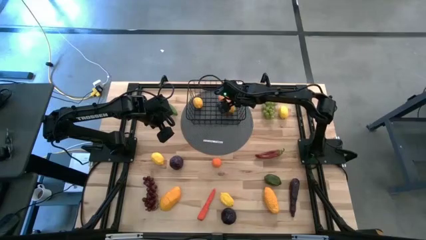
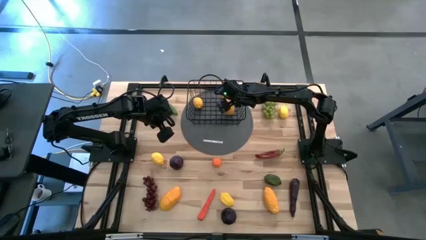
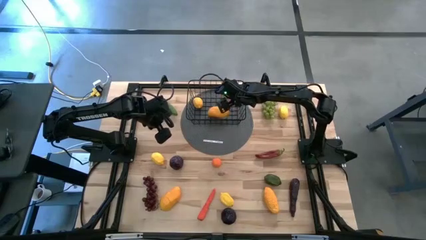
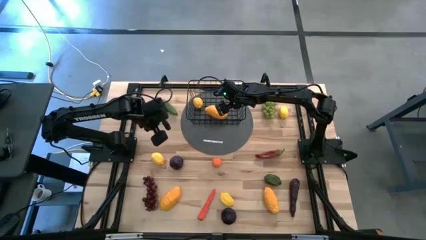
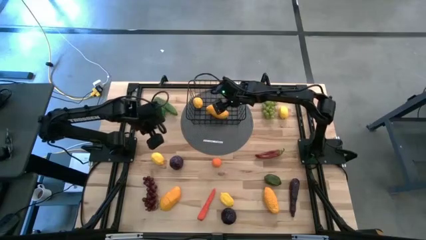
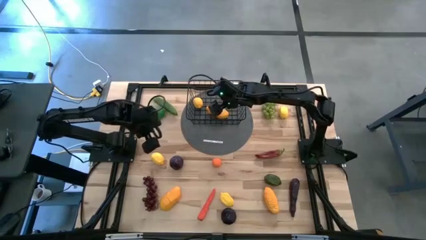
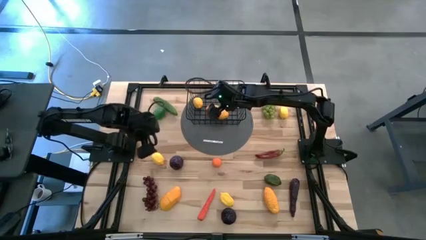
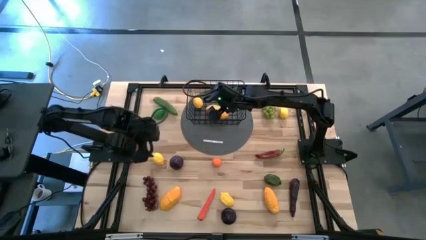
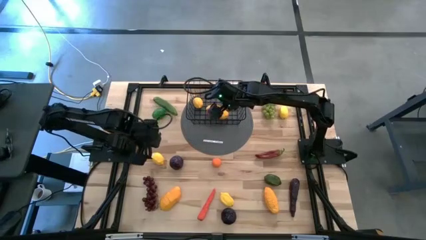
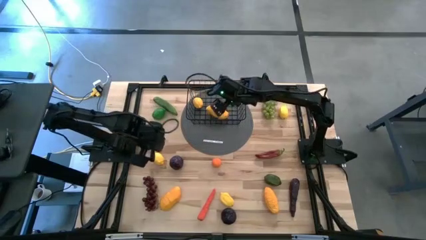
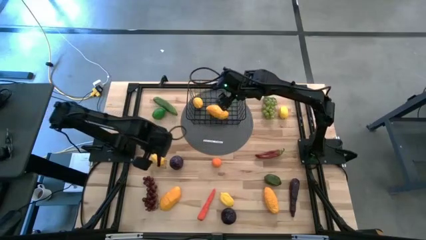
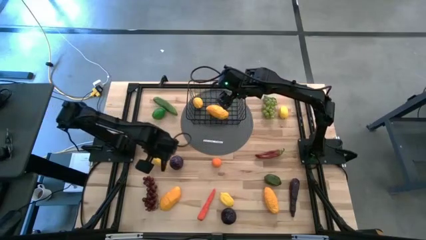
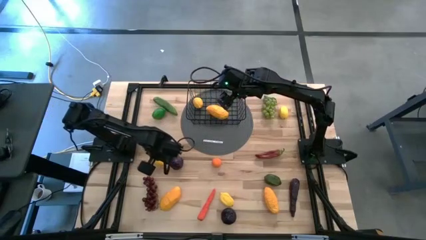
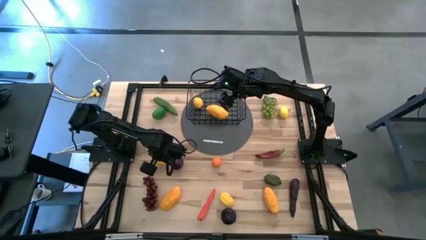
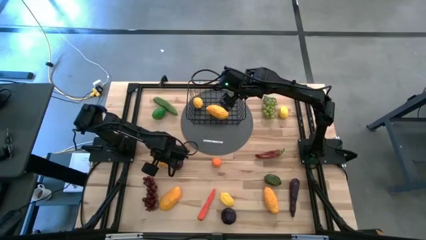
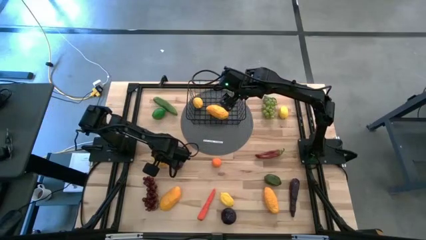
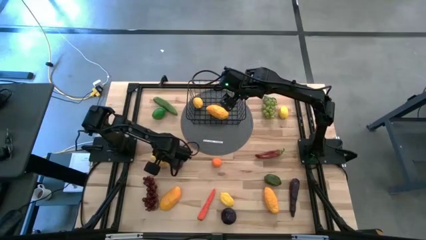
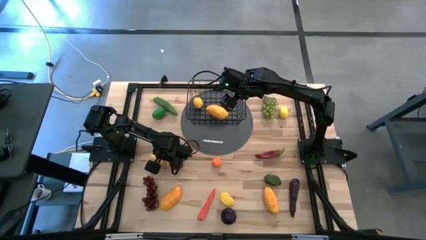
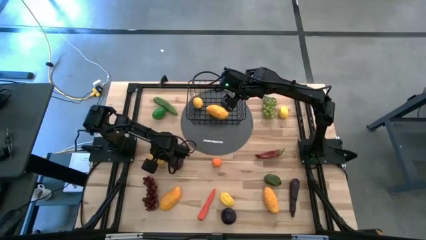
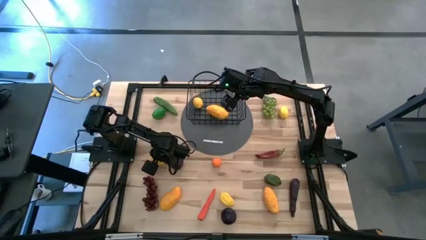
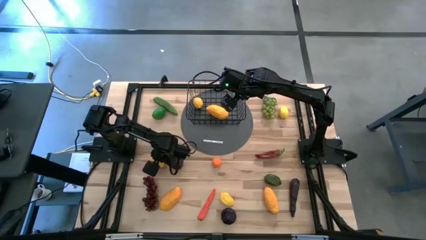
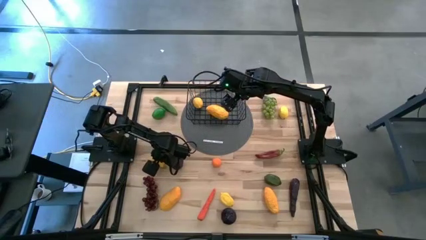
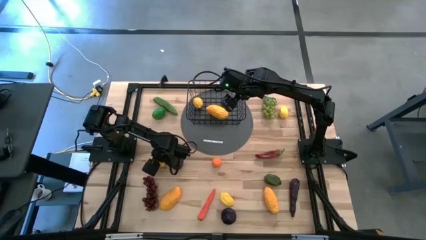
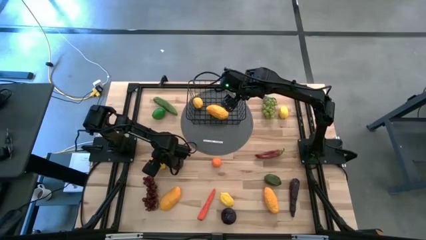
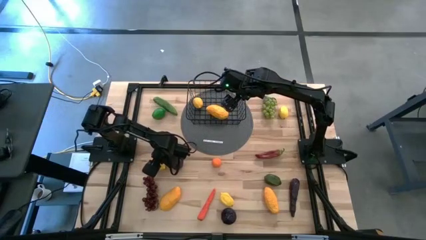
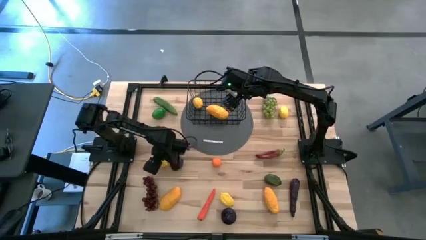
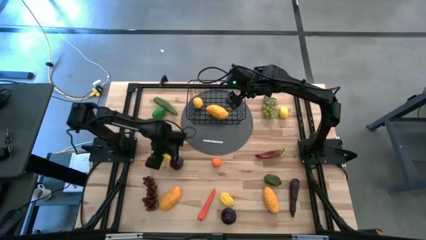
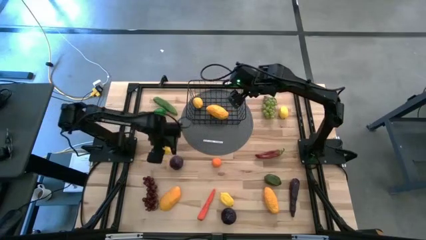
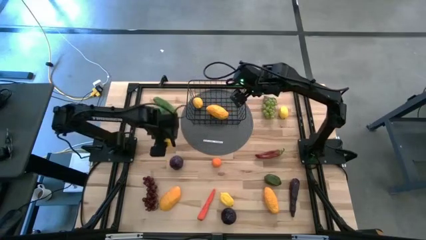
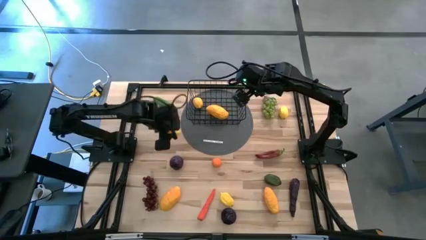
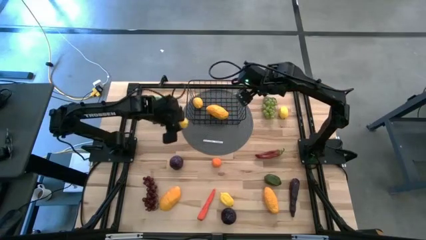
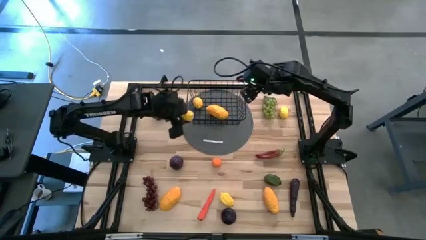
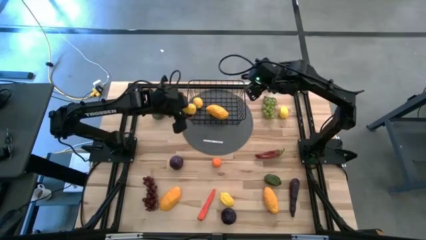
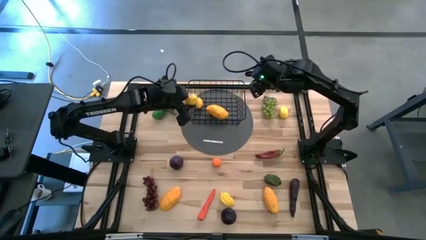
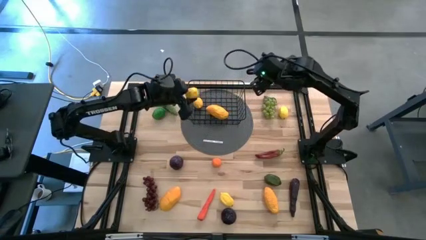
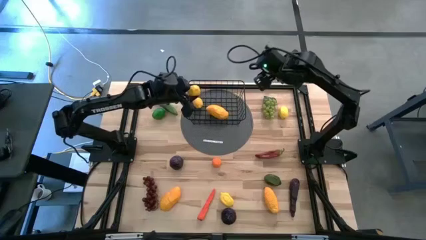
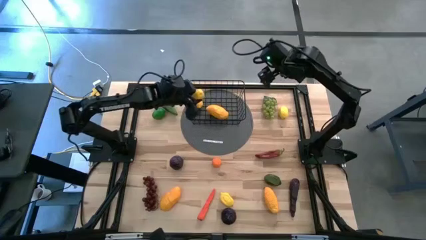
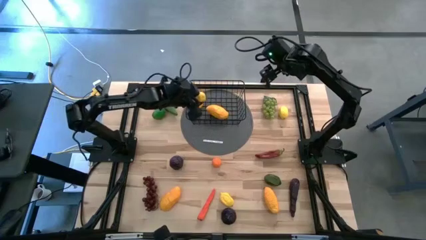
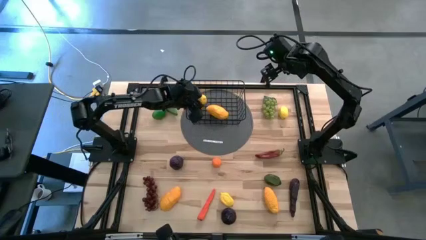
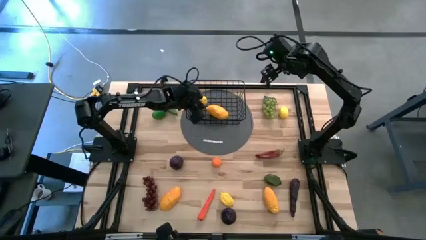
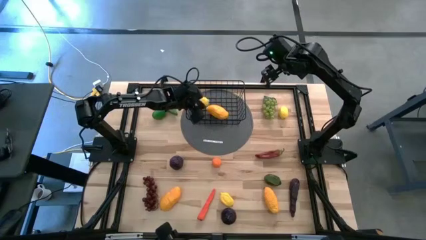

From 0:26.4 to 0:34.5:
Task: Build produce basket
Put the yellow lemon into the basket

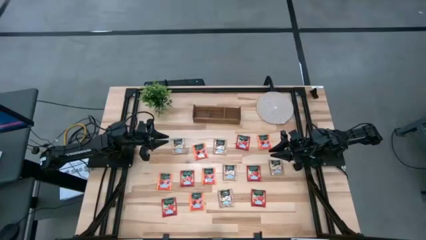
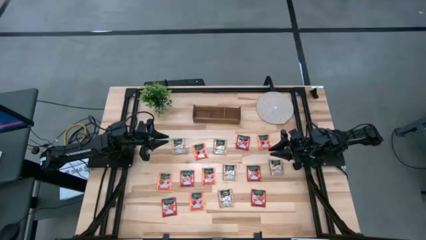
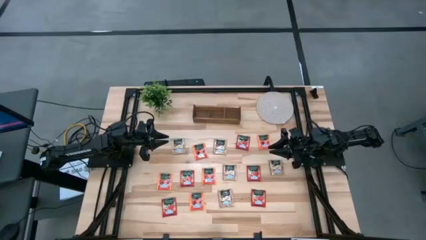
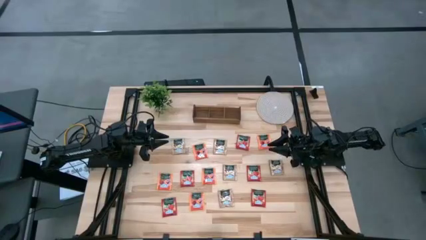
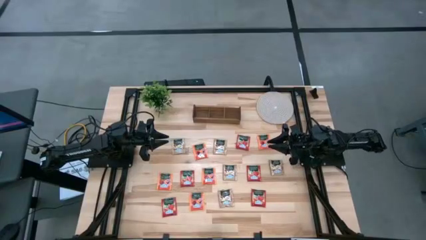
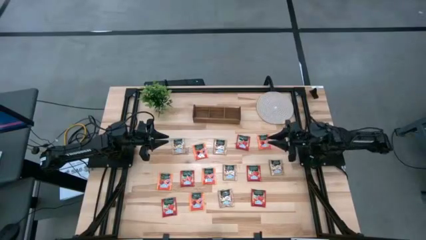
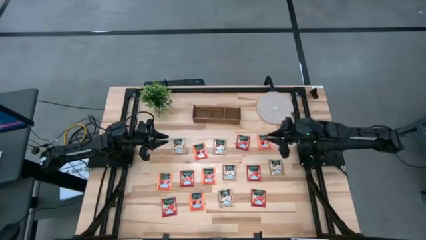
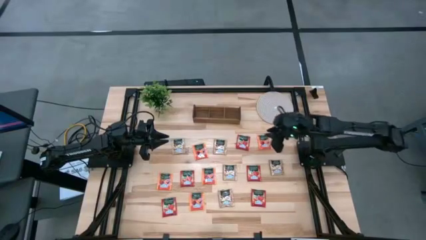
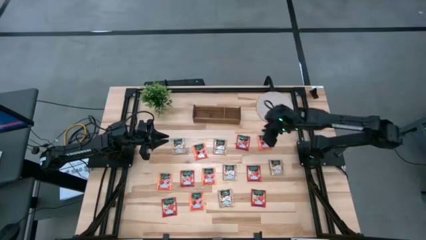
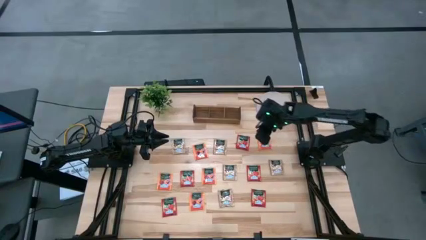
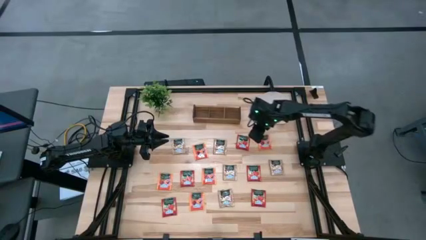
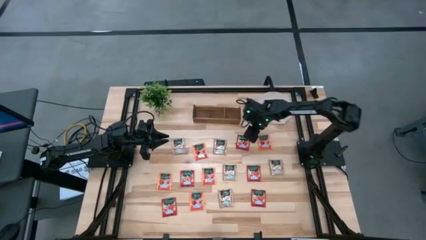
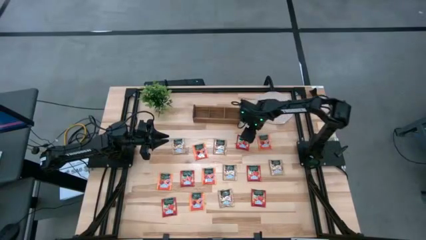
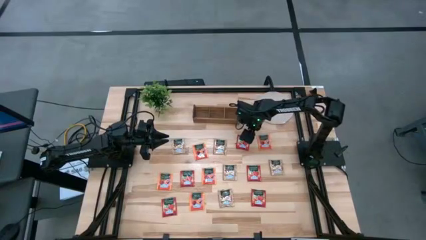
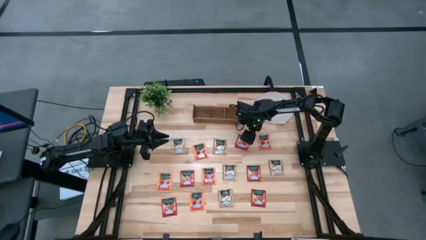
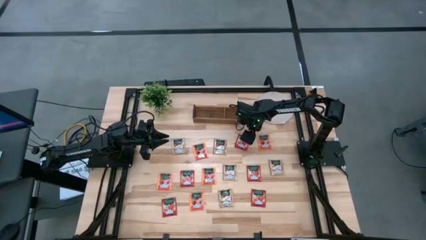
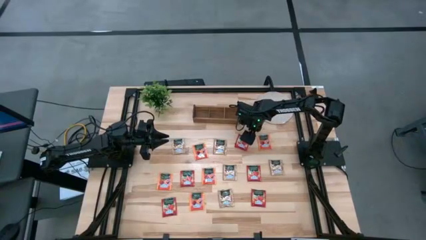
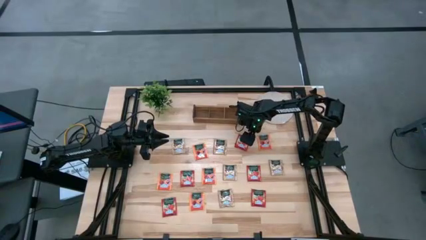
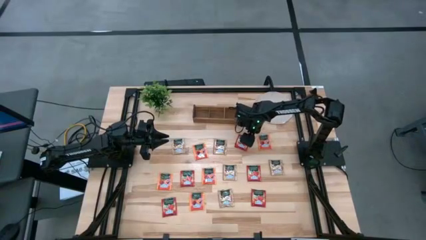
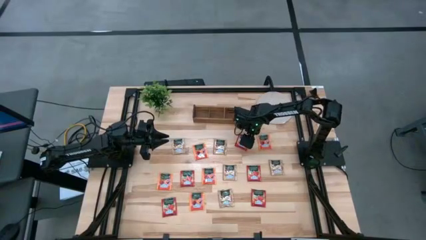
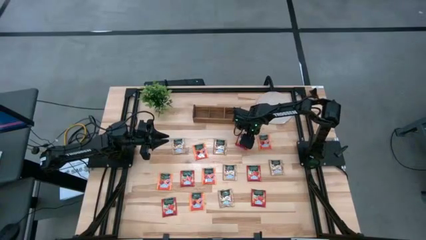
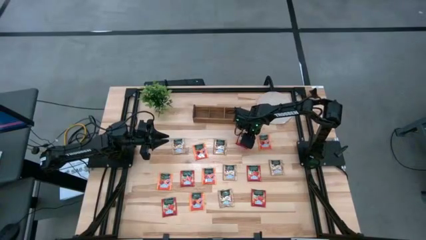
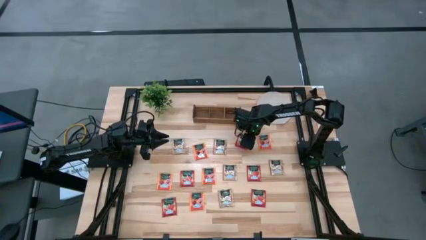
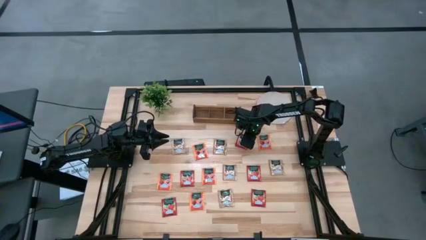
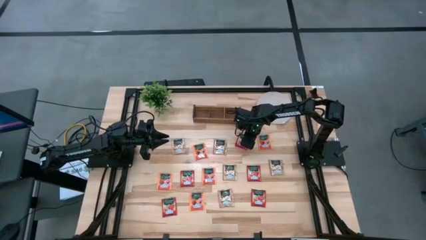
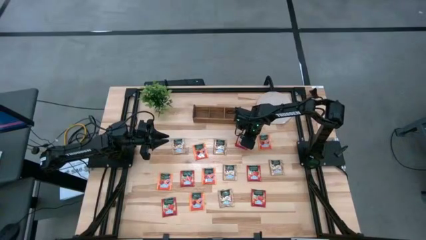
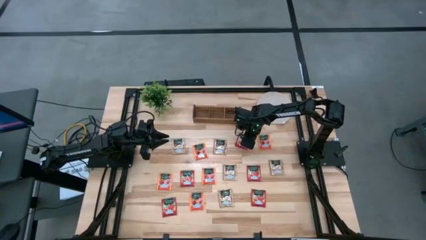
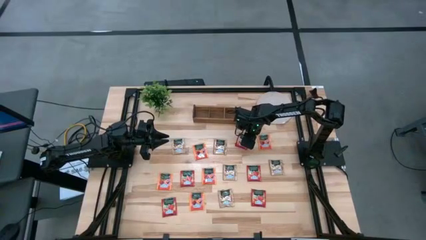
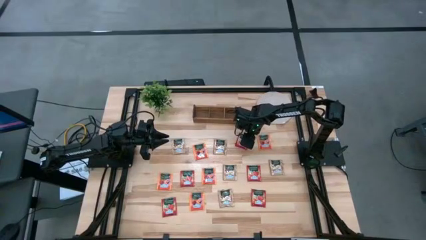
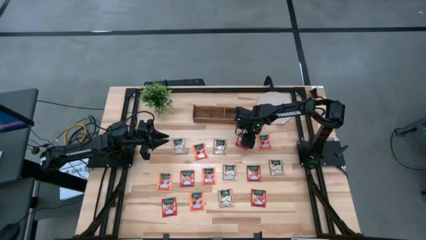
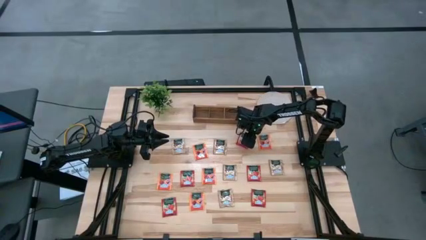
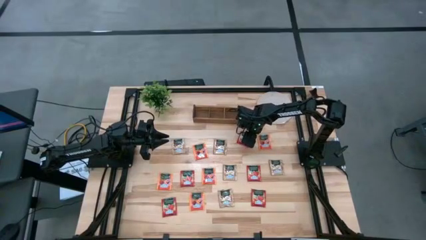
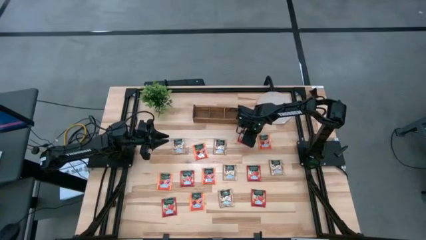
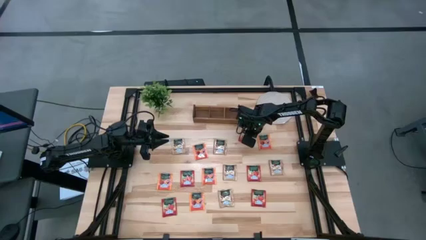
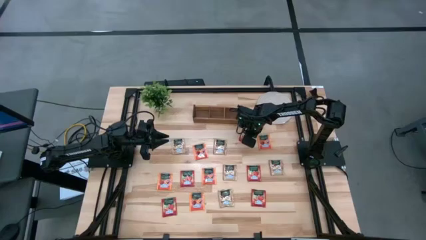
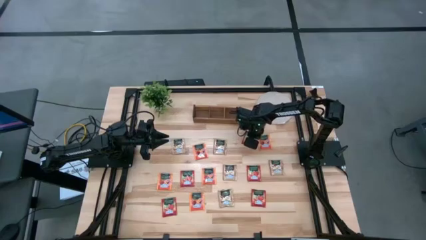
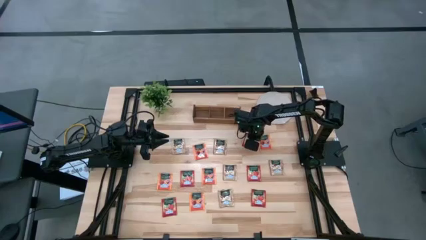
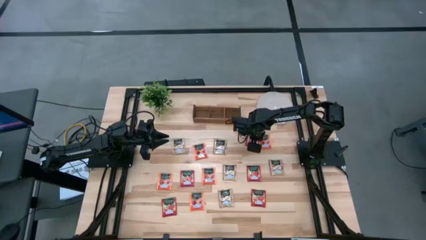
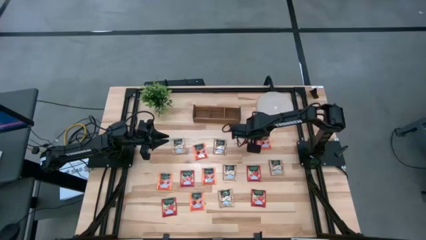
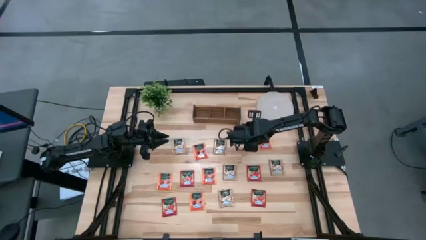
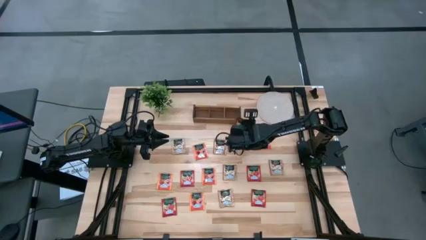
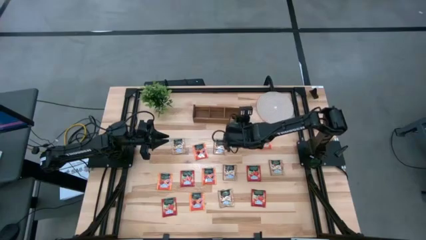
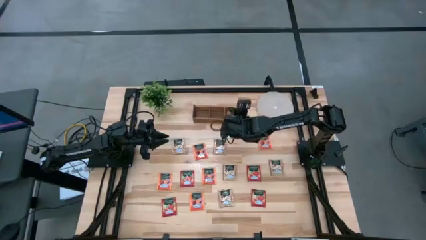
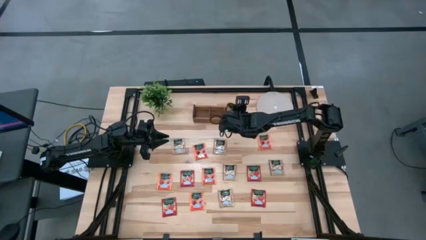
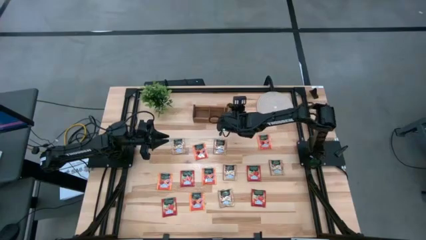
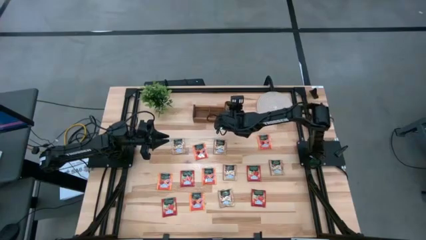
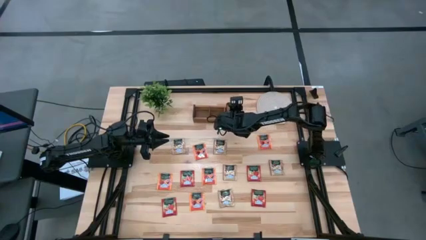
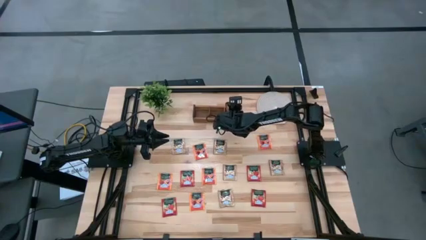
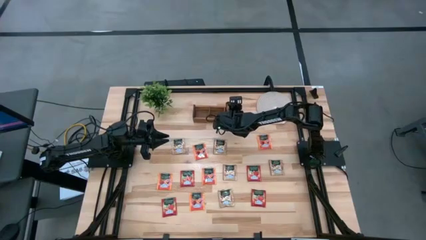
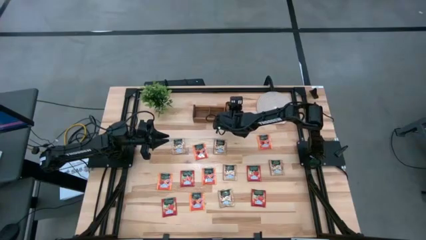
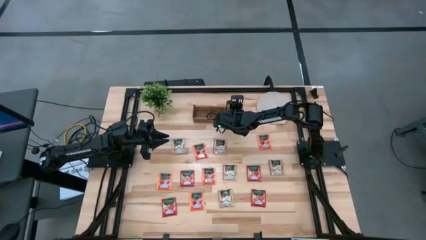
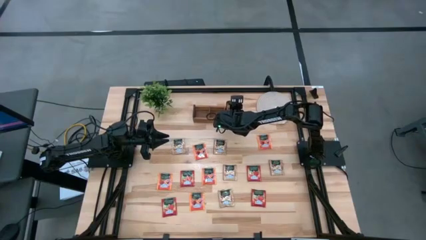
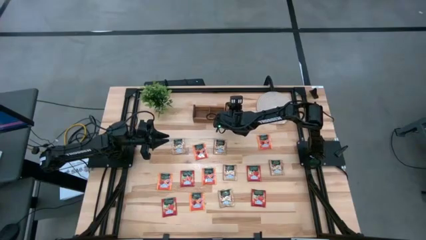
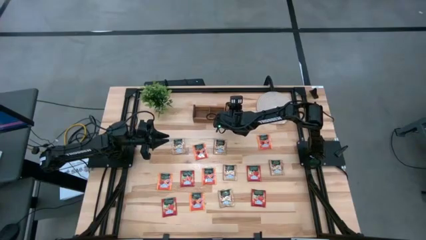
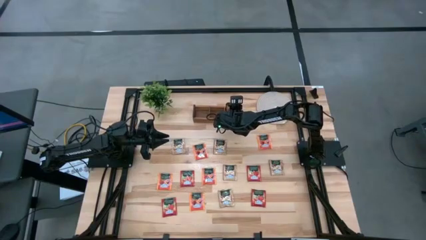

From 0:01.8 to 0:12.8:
Task: Pick & Place Tea
Put the red tea bag into the right section of the wooden organizer
